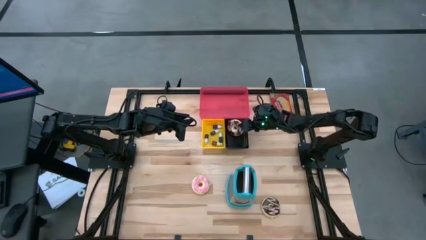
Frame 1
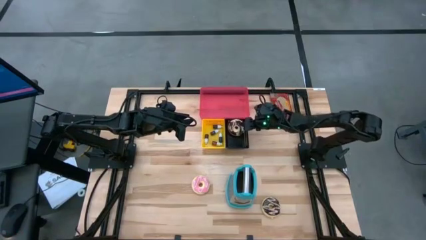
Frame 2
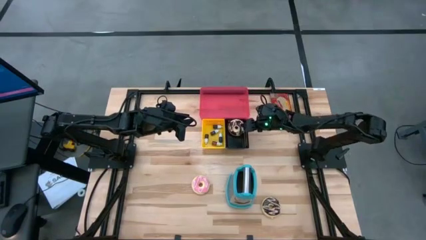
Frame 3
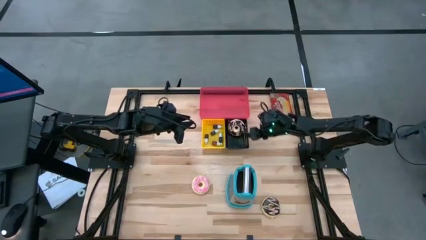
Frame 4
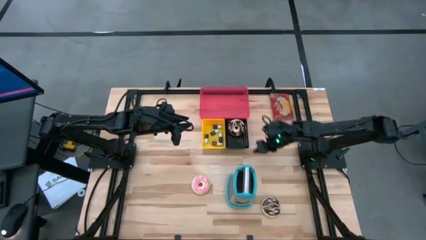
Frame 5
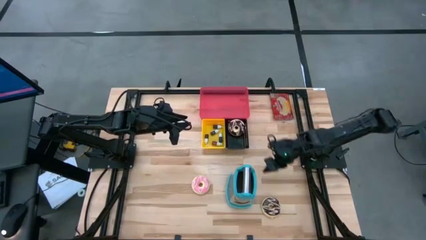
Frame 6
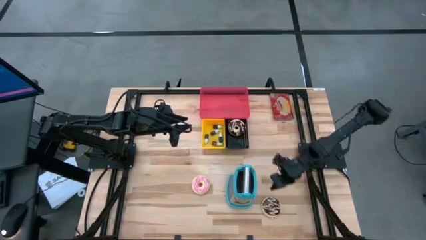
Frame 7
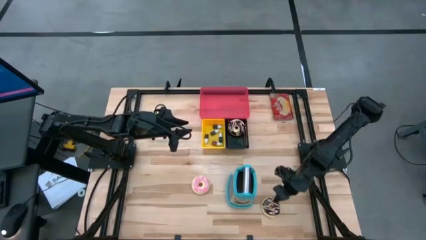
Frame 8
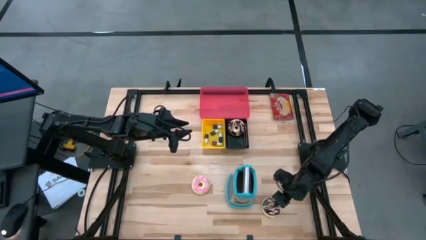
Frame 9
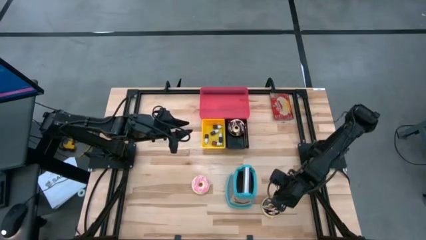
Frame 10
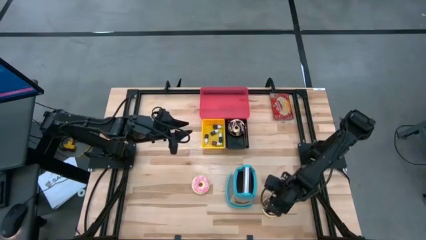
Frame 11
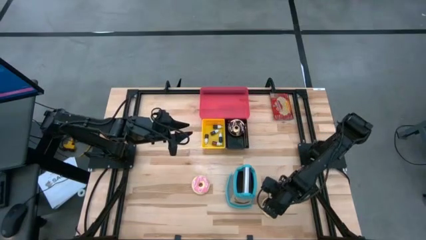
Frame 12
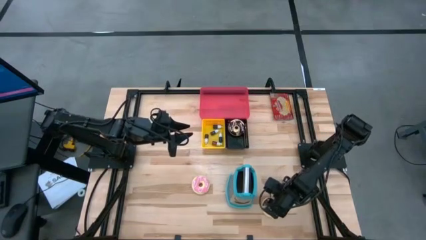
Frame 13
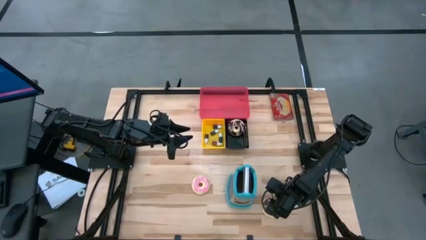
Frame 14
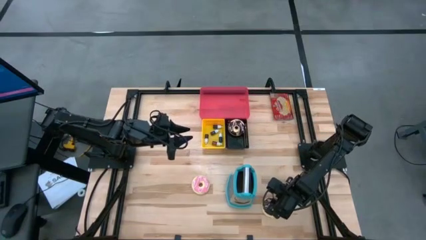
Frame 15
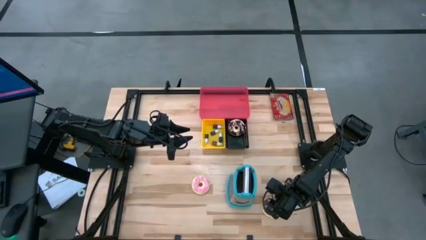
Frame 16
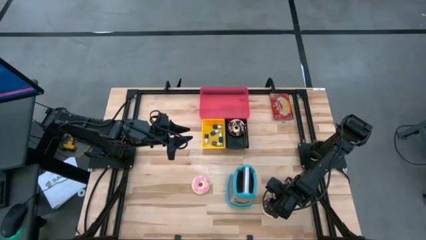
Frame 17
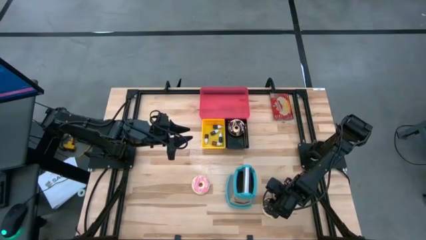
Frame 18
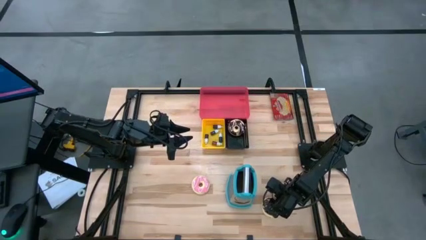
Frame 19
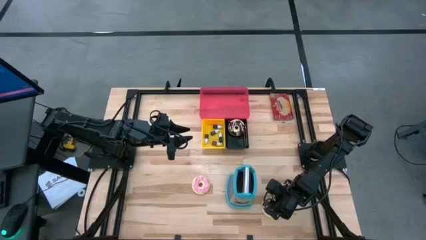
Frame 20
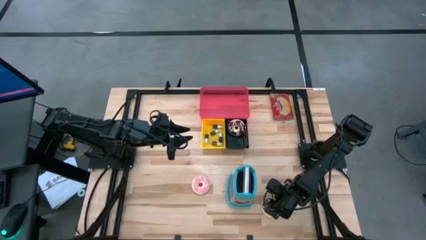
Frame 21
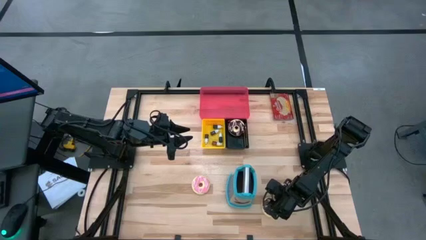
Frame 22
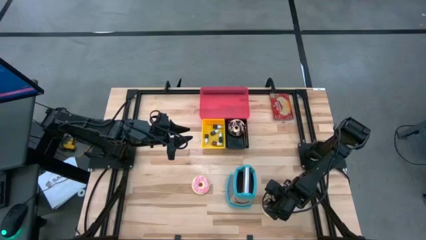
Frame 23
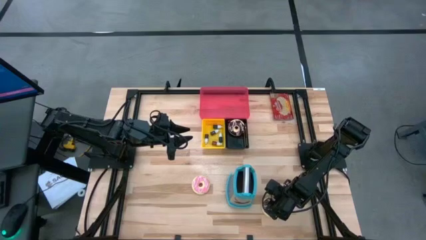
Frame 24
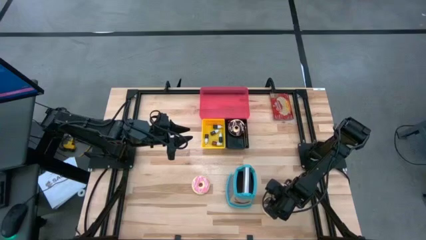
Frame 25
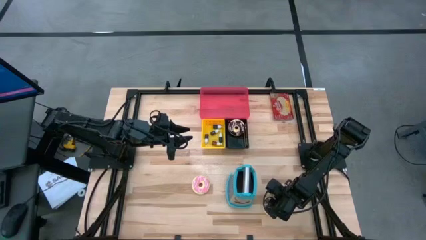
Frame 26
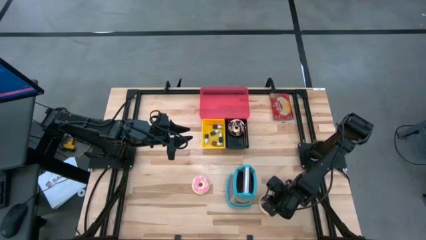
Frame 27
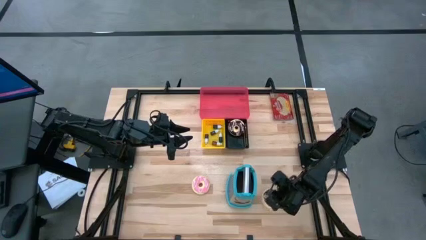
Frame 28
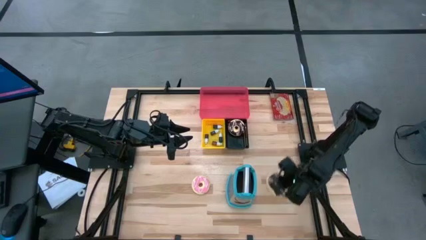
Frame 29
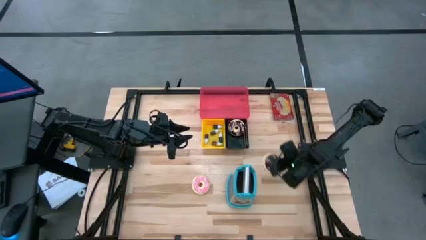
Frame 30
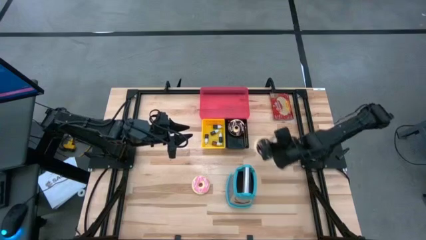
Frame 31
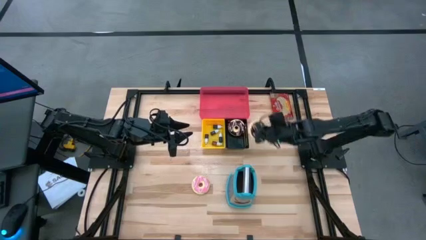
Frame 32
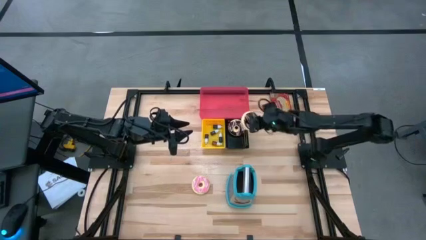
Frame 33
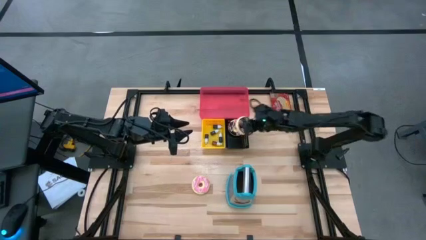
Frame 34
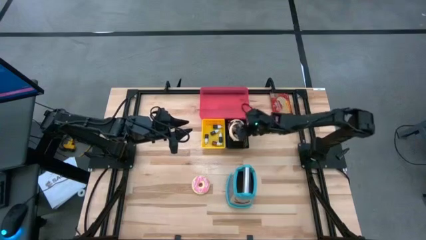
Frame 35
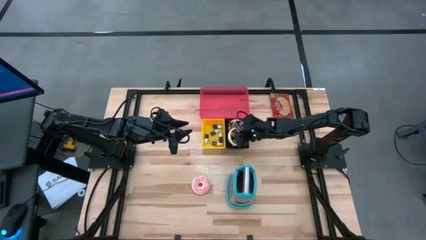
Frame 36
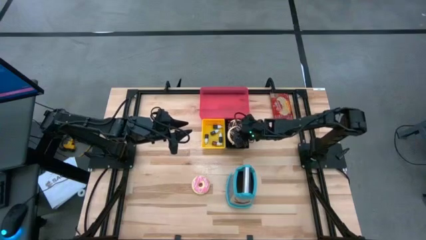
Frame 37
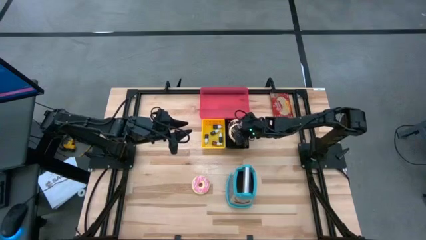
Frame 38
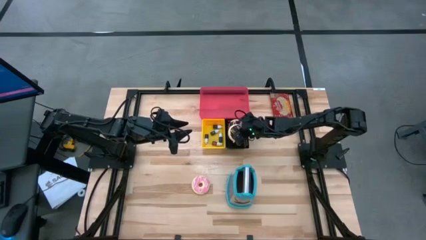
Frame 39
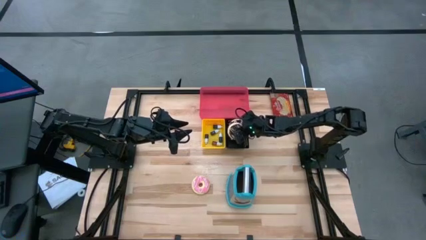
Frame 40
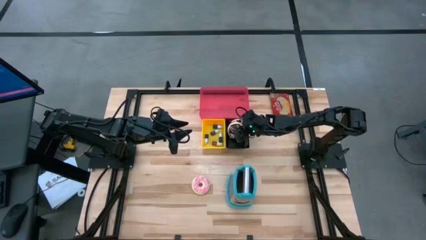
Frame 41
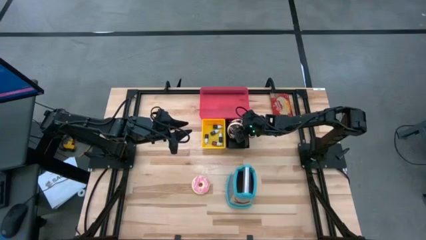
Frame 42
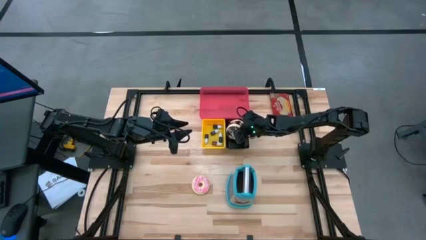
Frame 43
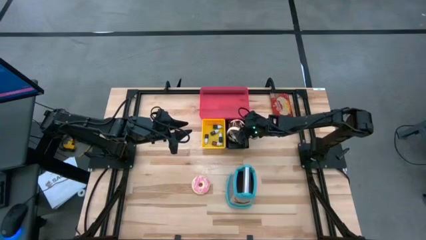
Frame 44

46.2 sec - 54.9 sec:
Put the black donut into the black bin

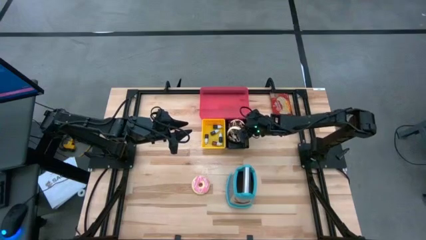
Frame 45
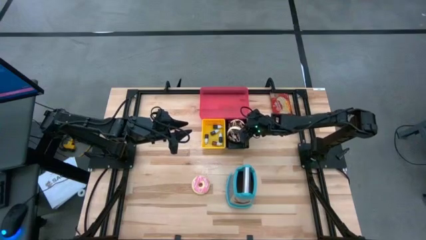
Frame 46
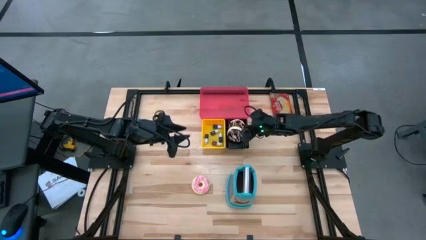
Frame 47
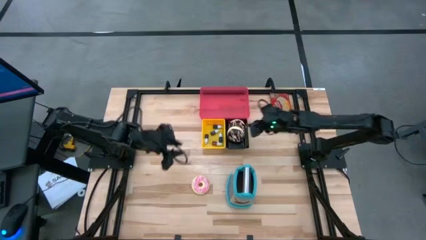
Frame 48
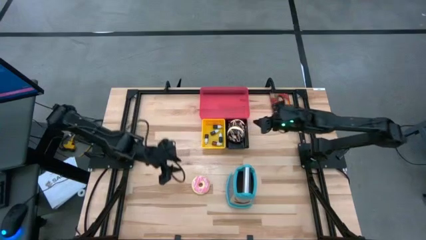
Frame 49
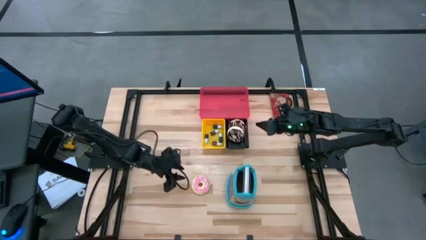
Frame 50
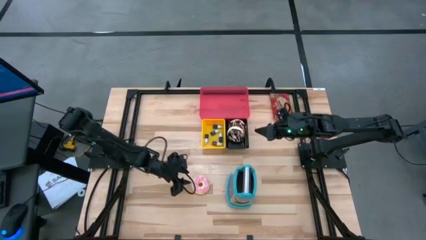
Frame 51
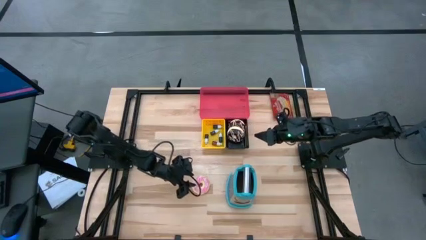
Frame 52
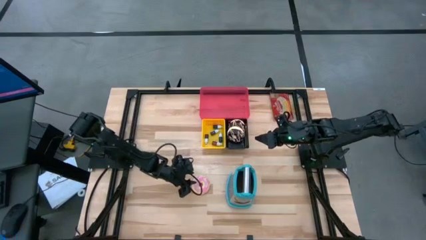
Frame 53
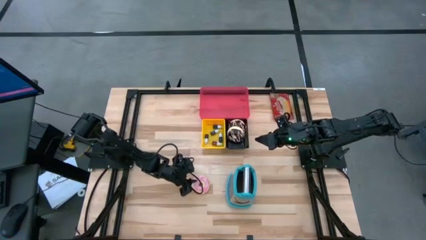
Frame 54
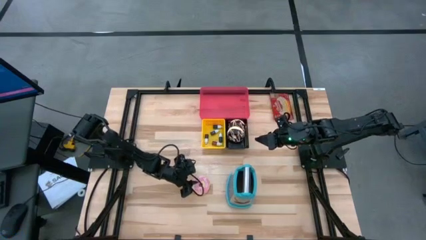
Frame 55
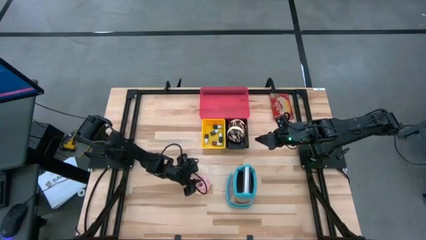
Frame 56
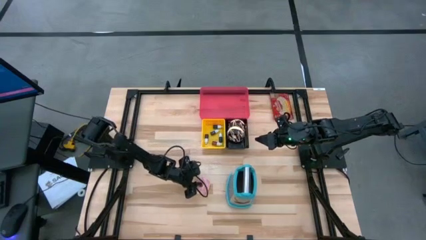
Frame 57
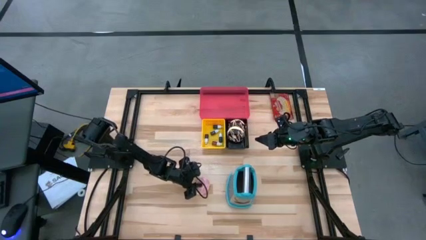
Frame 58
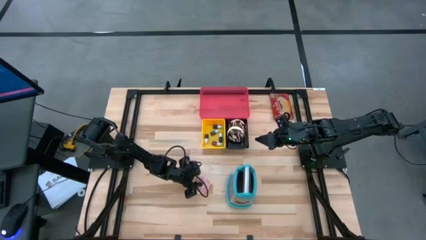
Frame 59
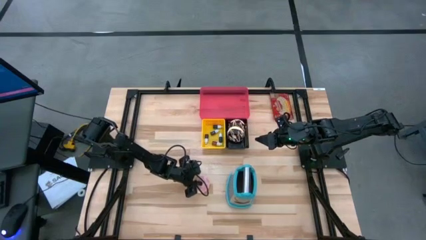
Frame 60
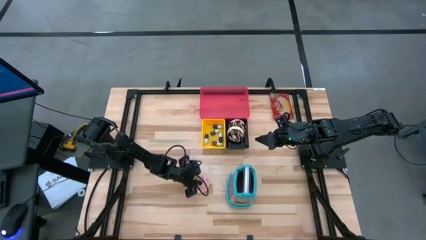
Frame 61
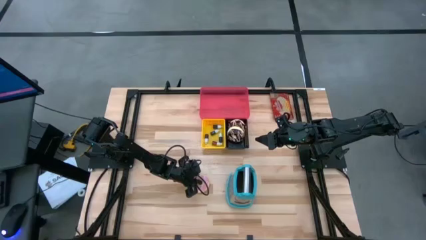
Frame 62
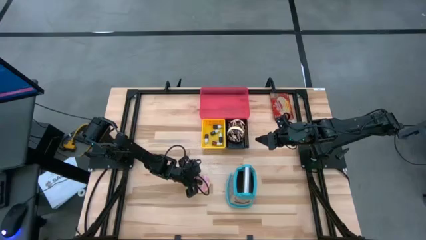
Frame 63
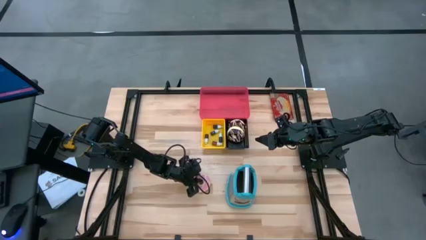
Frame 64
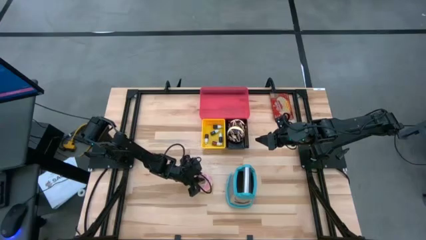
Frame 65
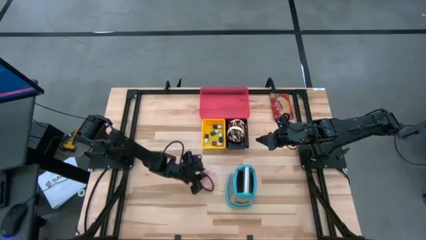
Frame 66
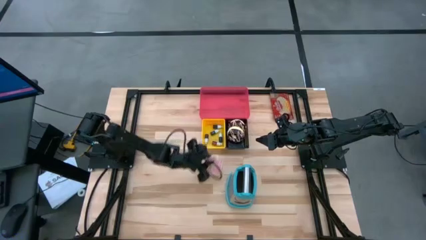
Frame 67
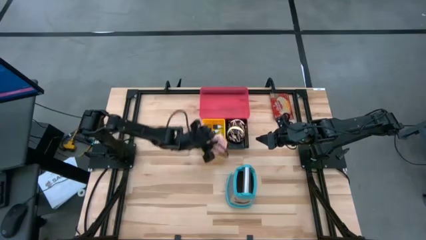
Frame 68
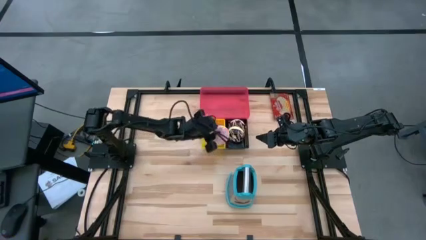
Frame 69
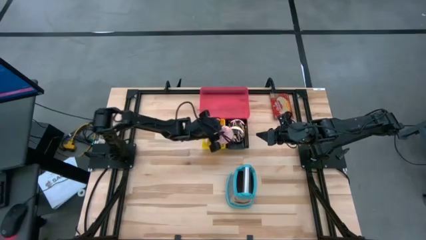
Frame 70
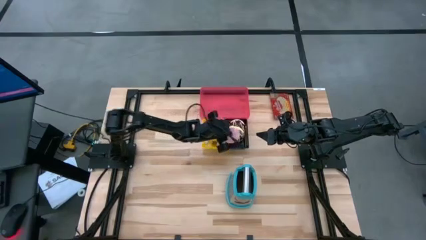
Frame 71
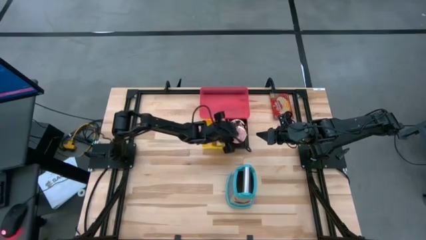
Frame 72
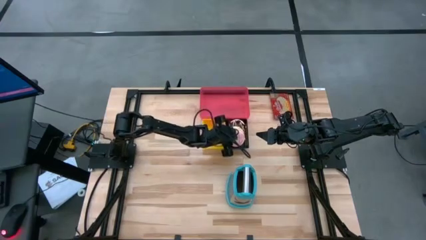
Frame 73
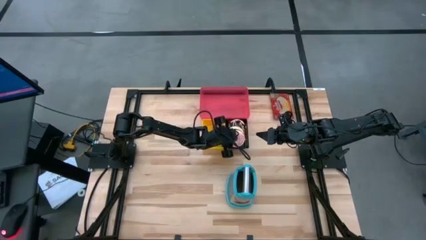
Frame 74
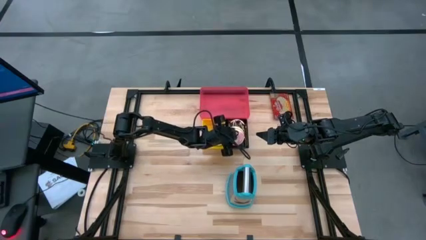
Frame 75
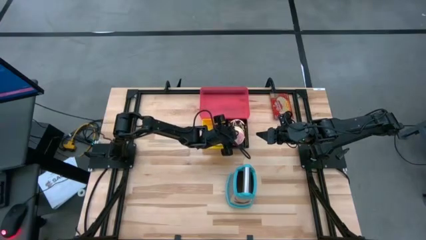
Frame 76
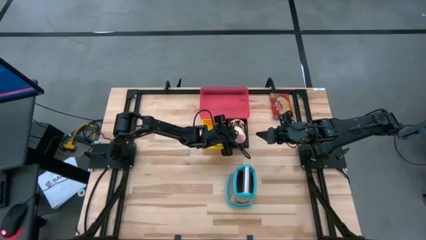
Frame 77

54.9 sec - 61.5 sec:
Put the pink donut into the black bin
